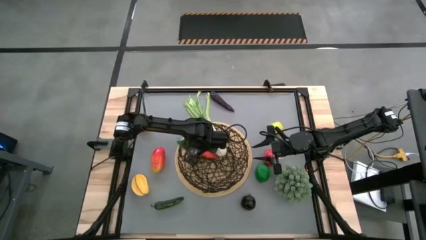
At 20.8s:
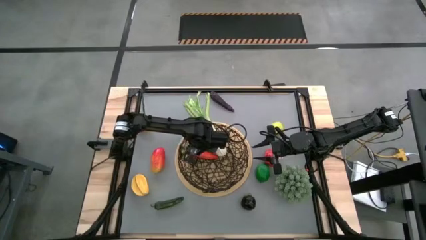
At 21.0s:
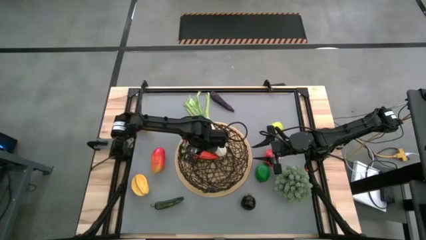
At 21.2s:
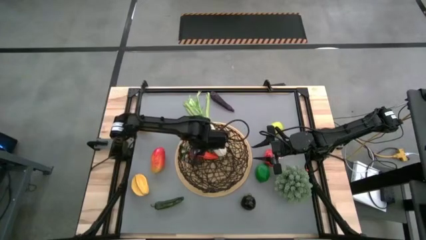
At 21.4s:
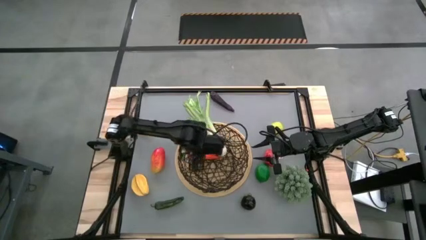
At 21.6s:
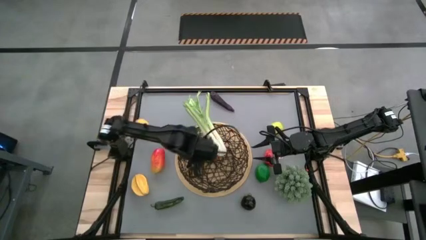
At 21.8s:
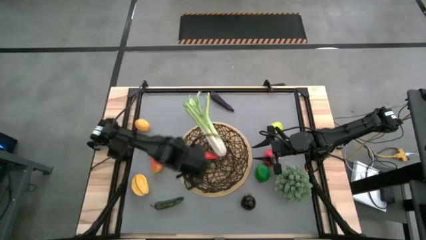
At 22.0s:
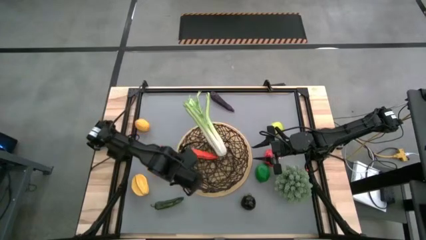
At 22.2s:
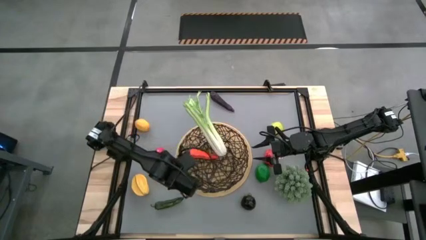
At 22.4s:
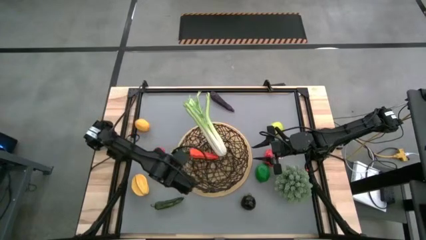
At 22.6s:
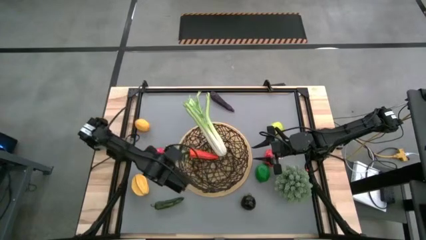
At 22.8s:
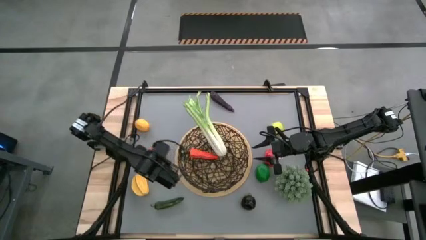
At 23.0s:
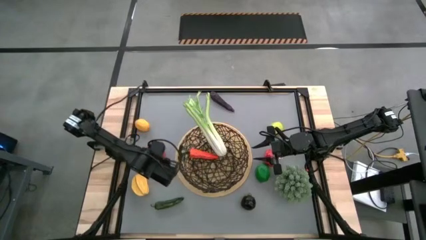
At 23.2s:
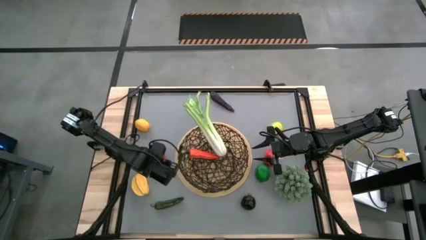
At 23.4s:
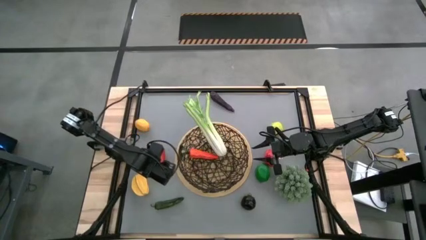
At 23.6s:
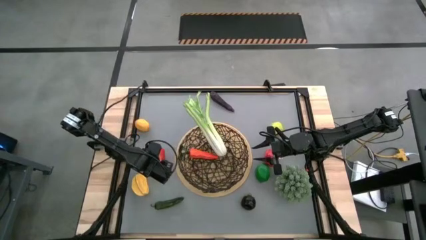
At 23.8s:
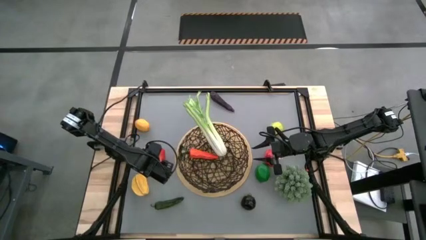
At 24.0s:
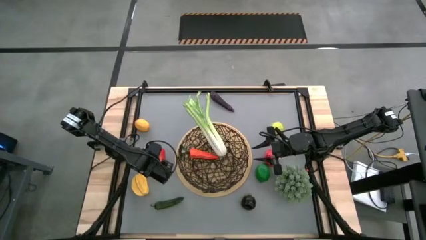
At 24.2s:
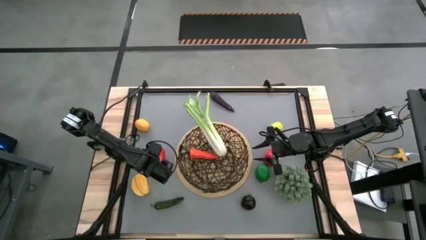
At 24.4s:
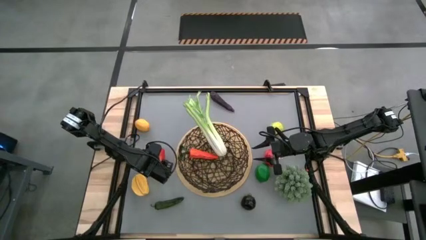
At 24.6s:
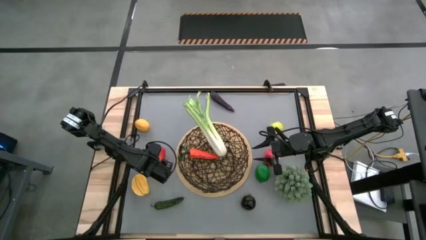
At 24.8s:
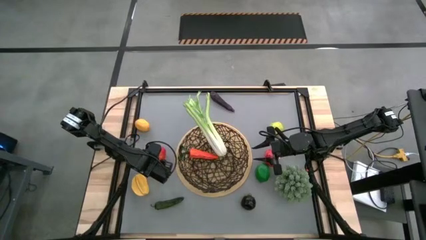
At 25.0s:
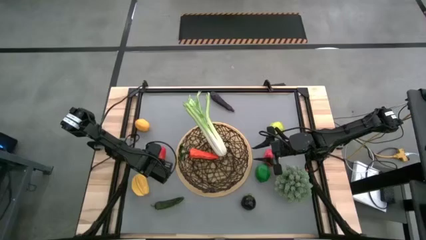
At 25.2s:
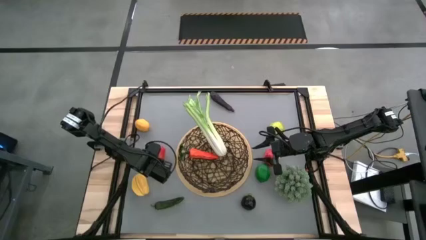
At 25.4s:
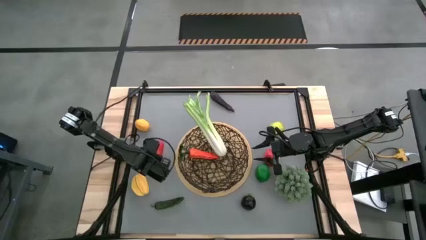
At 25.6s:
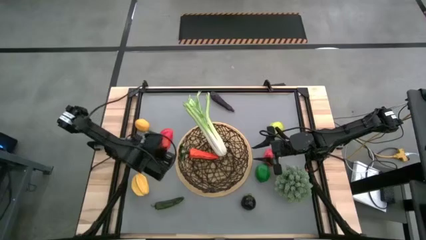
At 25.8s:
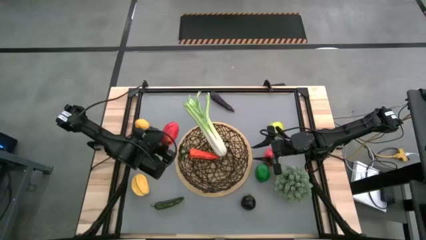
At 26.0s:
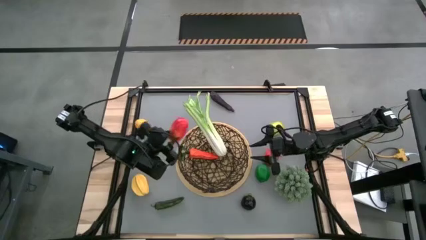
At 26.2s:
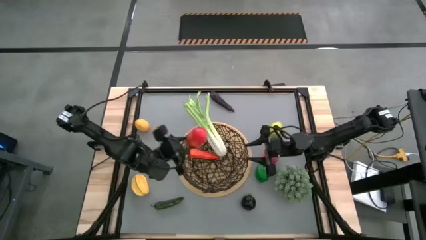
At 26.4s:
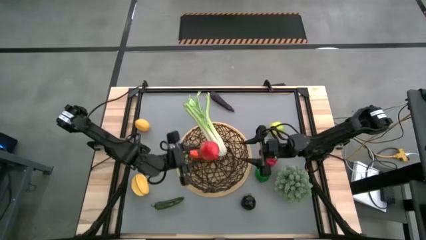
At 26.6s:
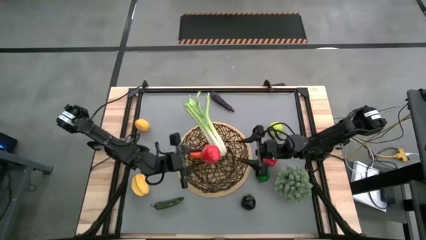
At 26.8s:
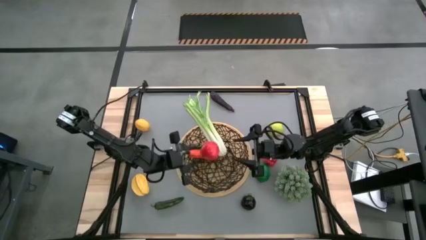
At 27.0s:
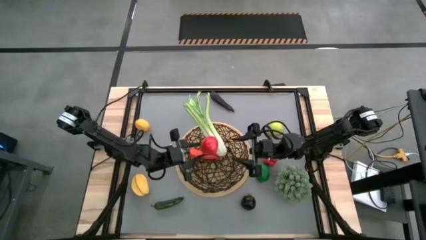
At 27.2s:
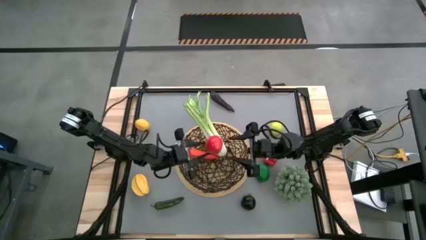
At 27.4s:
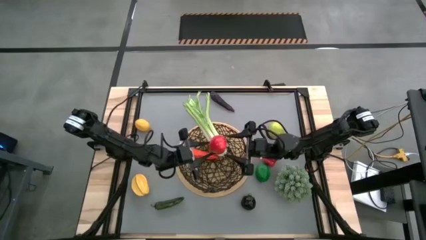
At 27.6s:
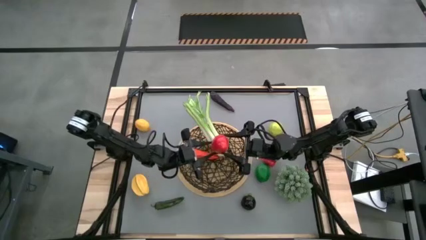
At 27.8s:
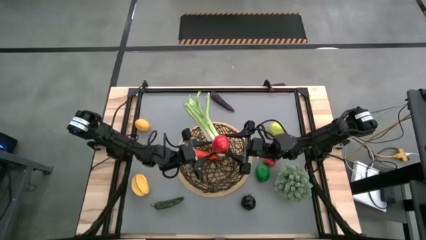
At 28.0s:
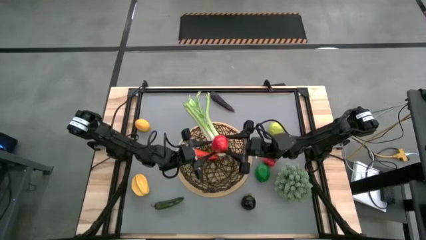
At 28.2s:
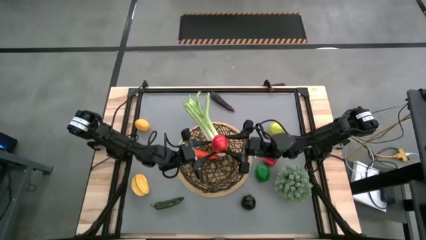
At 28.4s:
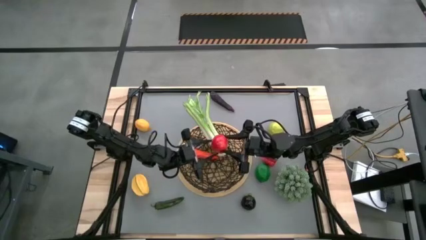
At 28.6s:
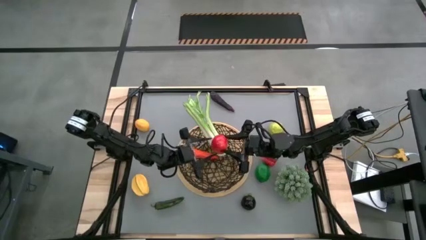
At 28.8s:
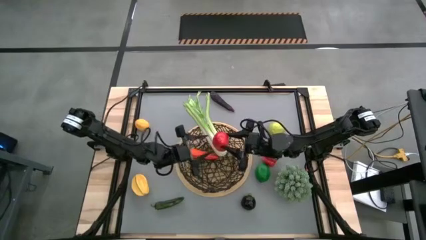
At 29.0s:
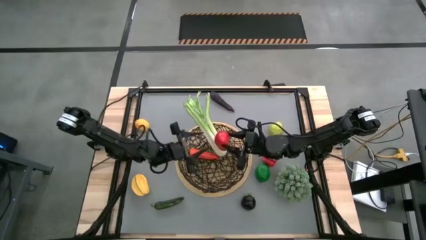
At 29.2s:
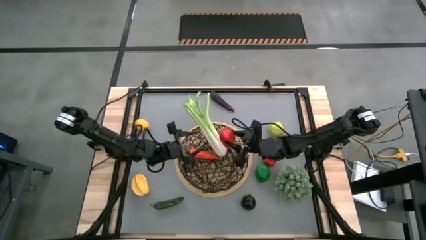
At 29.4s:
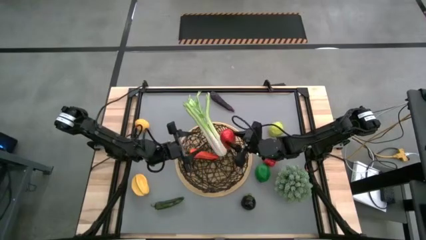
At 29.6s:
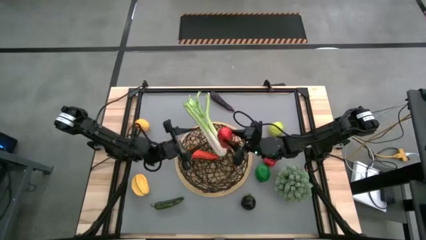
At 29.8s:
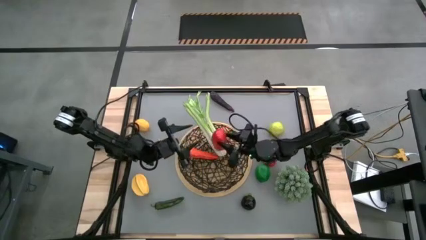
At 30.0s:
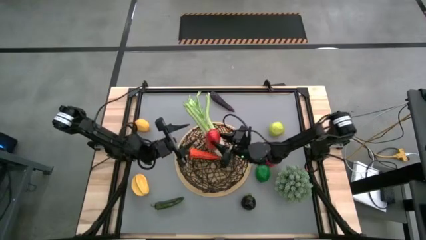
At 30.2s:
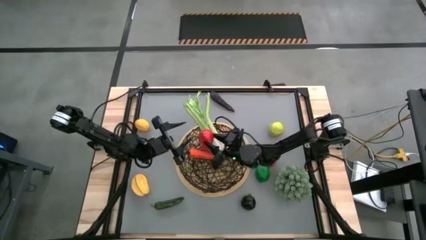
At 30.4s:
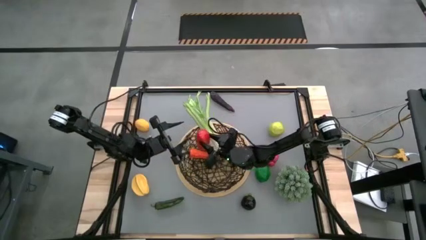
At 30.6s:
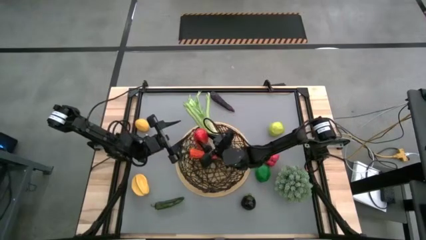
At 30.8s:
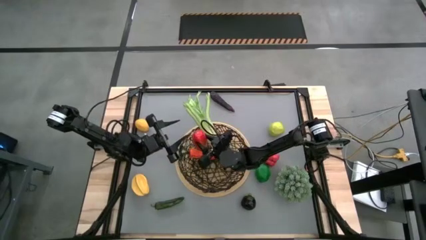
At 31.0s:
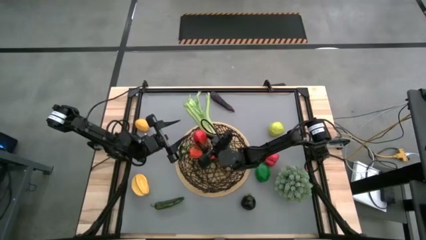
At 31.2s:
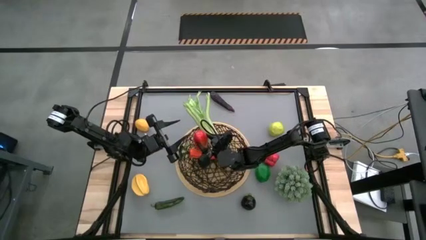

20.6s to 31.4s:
Task: Build produce basket
Put the mango into the wire basket

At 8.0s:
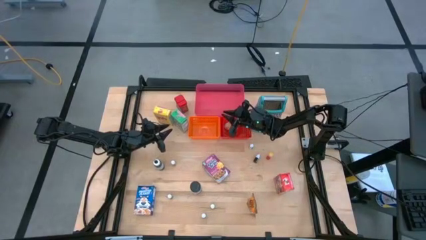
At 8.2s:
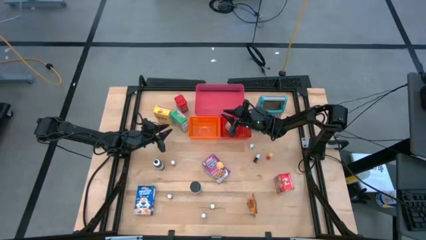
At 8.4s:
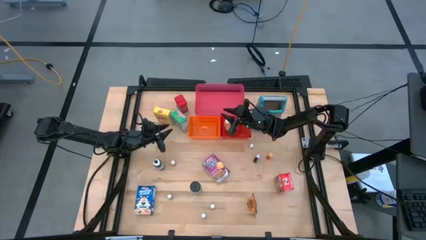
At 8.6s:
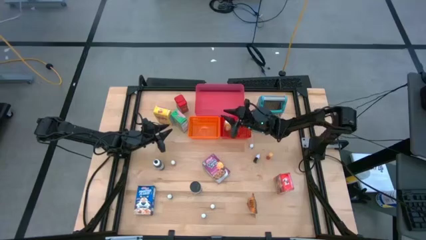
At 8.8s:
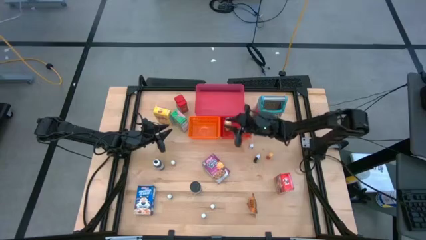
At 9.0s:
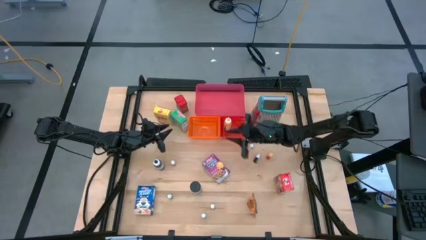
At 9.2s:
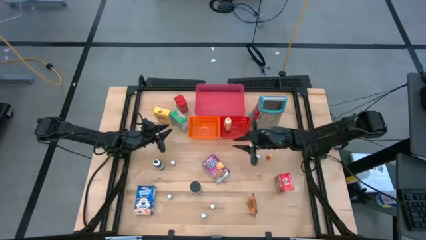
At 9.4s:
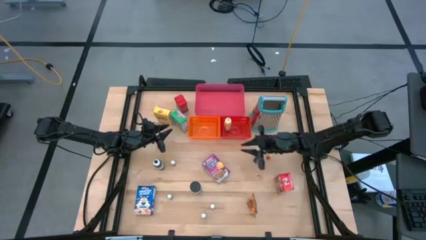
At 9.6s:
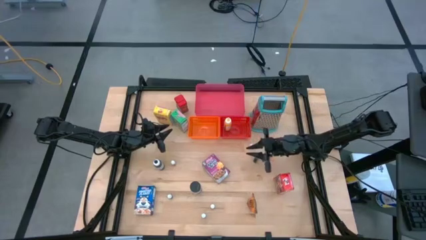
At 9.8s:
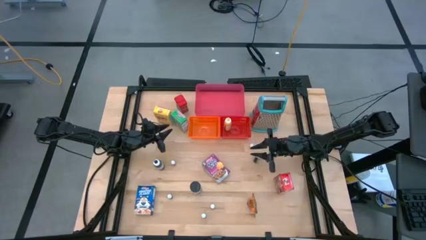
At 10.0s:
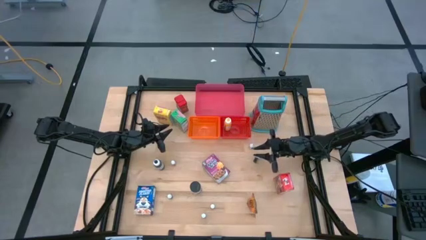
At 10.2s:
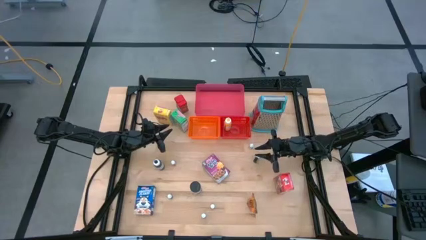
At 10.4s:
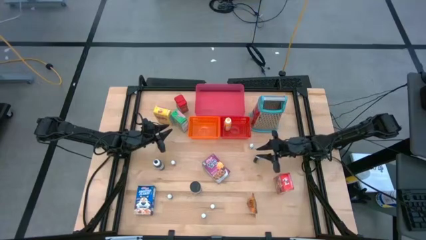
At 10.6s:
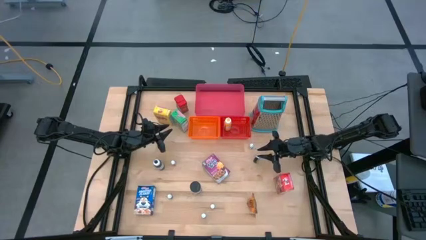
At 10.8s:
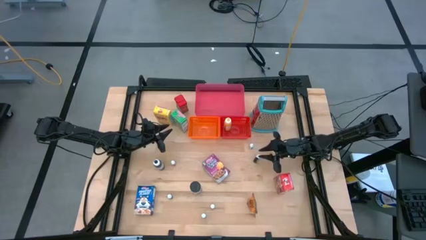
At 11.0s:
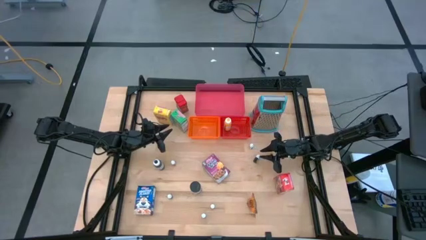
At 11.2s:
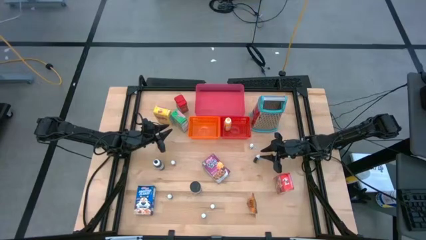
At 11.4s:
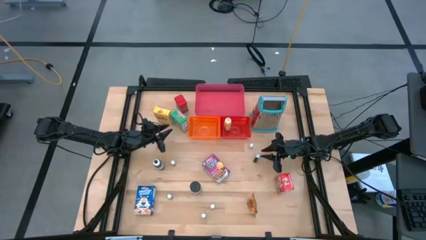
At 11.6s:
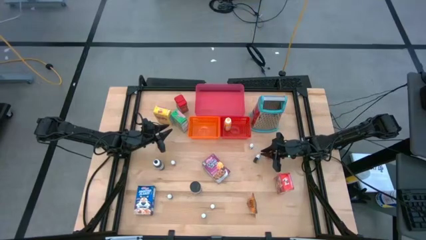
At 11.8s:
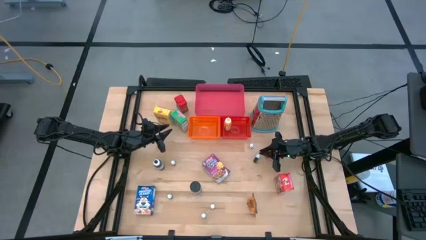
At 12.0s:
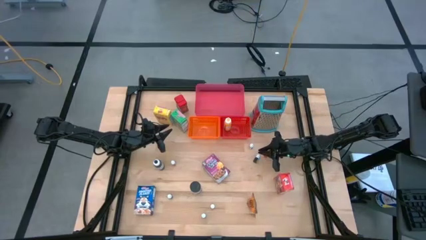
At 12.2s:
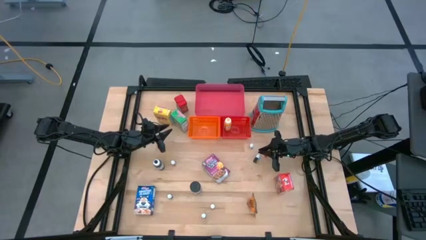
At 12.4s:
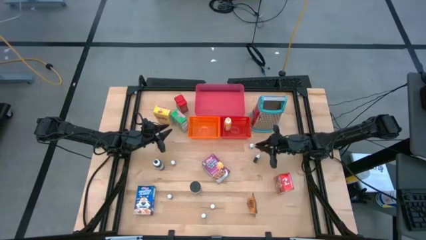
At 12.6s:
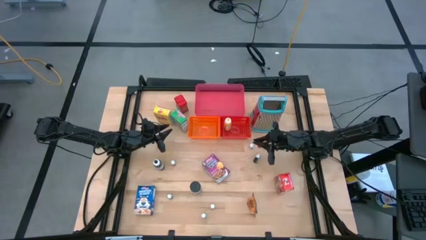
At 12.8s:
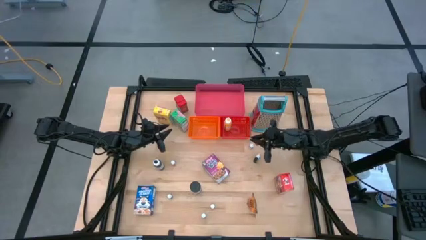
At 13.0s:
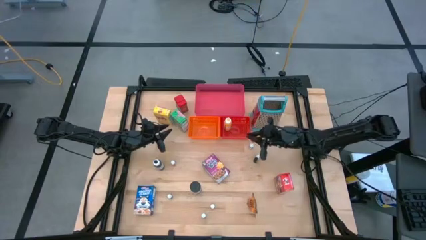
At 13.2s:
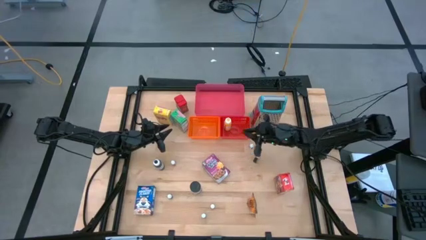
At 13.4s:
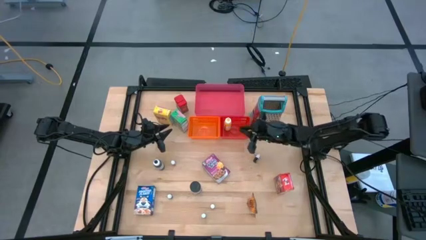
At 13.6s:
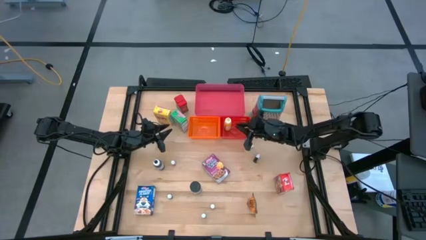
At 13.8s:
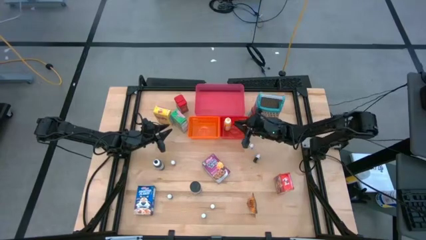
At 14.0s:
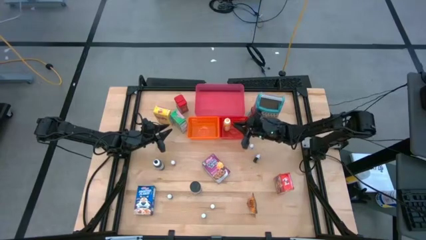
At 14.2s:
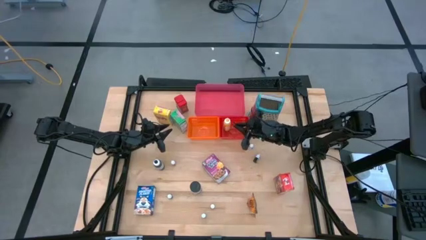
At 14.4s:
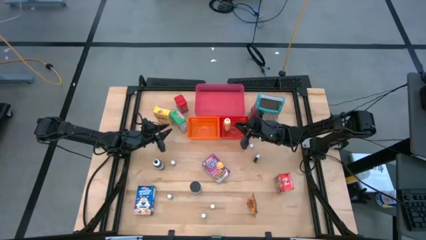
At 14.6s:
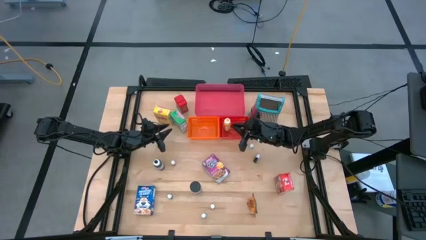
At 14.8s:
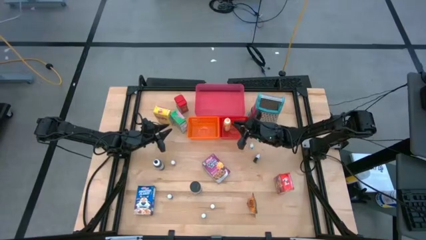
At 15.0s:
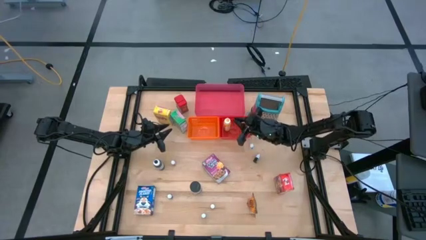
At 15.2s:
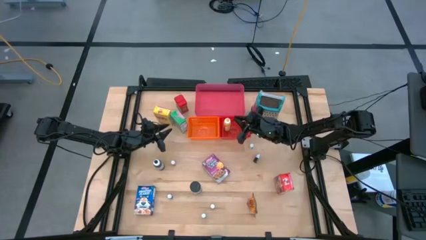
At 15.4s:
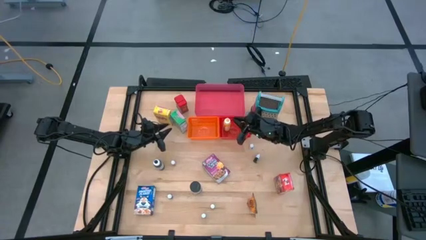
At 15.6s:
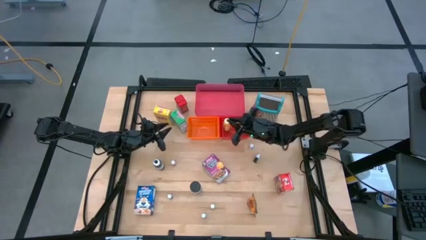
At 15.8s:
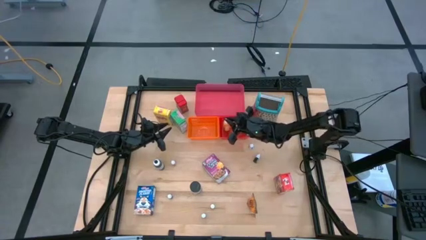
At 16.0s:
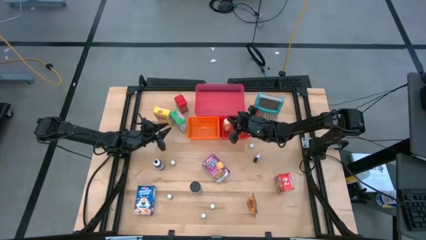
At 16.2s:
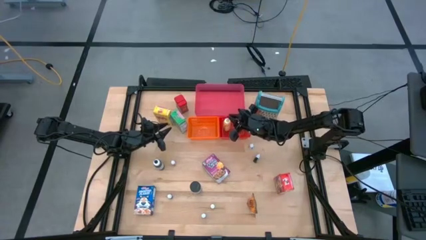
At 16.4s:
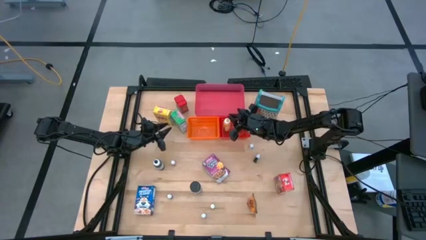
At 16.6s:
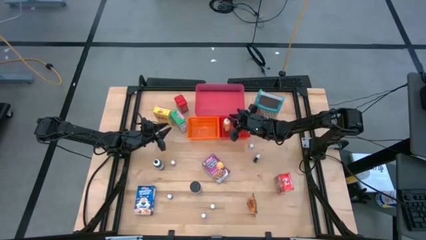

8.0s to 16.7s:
Task: Pick & Place Kitchen Items
Put the bottom red food coloring bottle into the red bin
